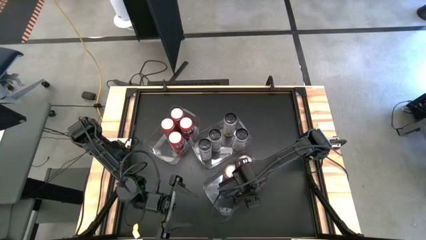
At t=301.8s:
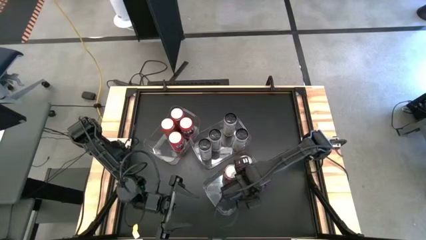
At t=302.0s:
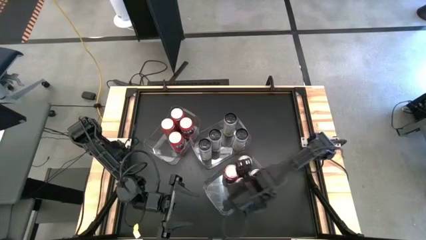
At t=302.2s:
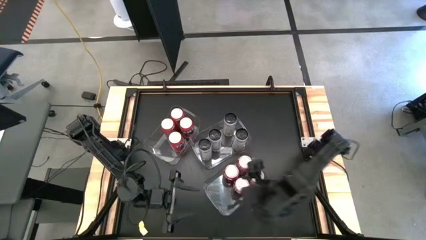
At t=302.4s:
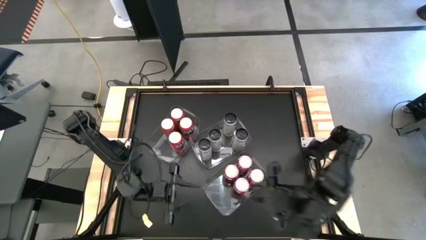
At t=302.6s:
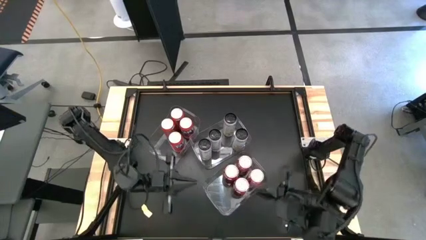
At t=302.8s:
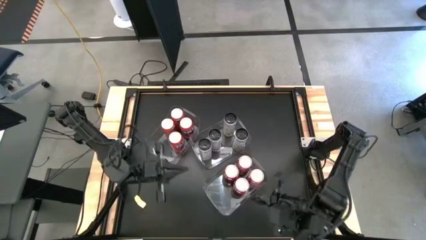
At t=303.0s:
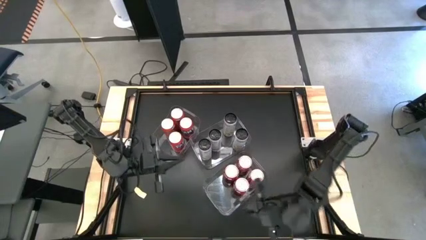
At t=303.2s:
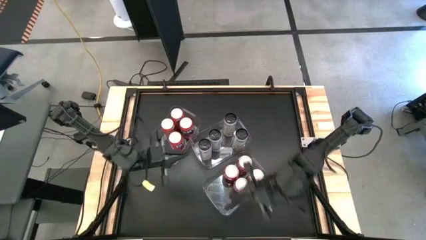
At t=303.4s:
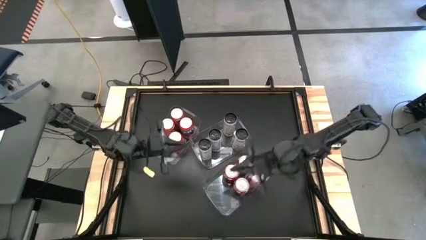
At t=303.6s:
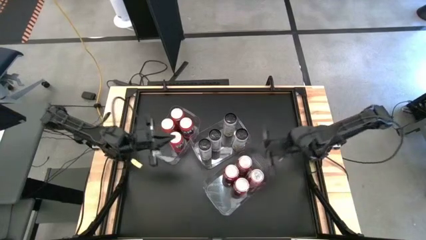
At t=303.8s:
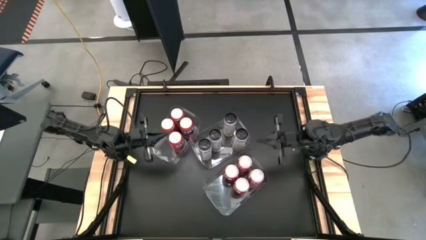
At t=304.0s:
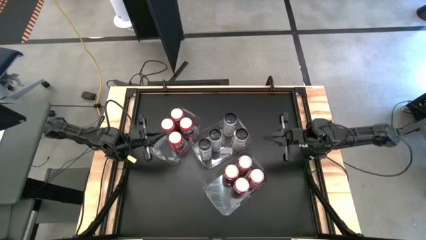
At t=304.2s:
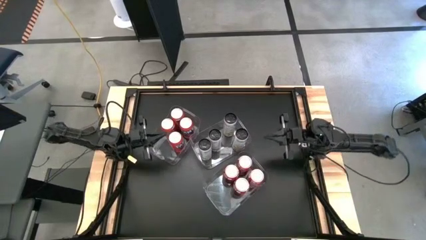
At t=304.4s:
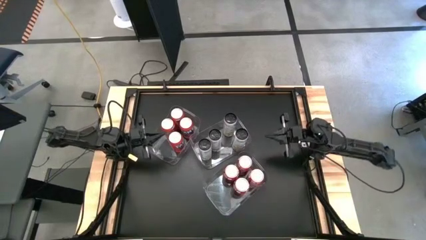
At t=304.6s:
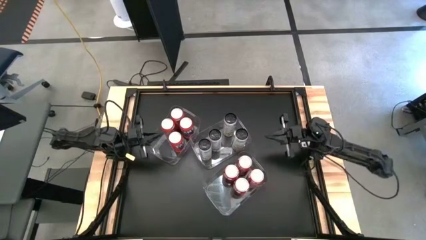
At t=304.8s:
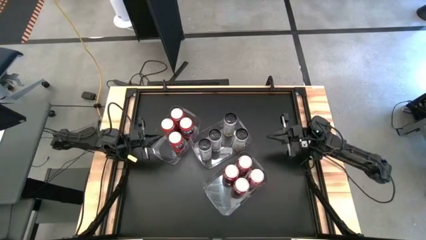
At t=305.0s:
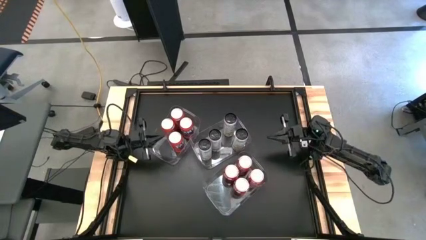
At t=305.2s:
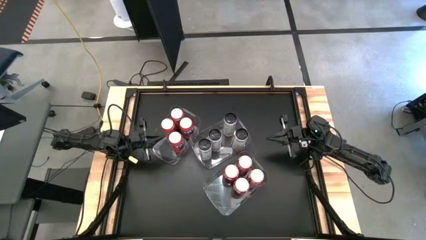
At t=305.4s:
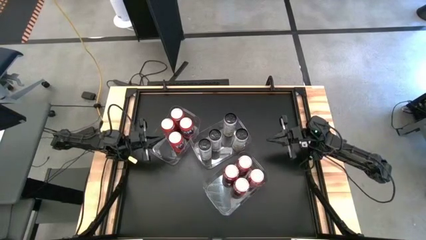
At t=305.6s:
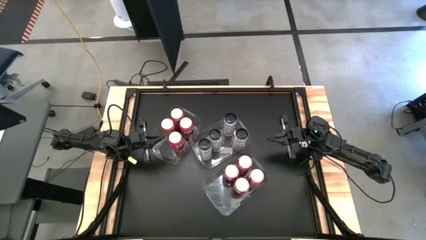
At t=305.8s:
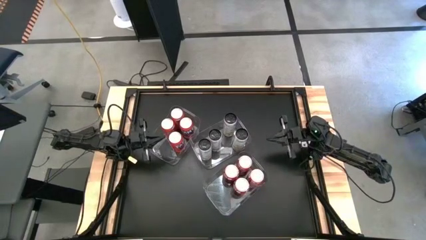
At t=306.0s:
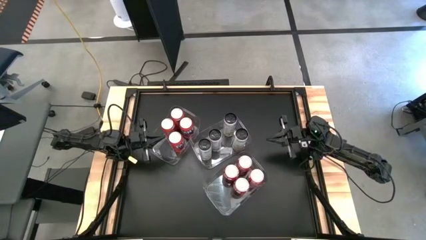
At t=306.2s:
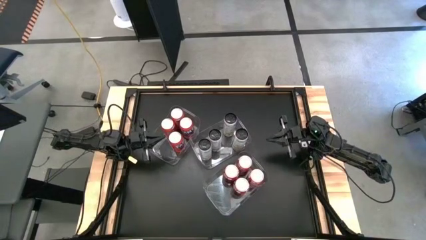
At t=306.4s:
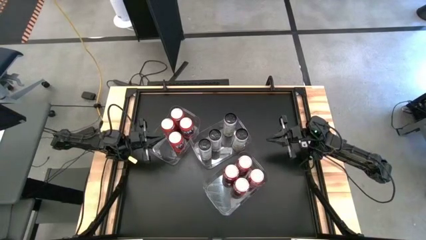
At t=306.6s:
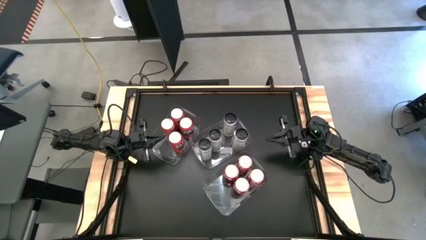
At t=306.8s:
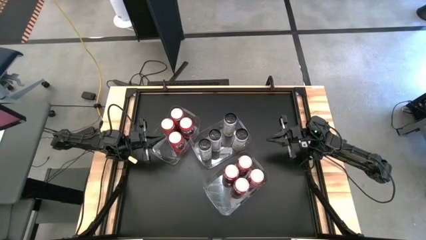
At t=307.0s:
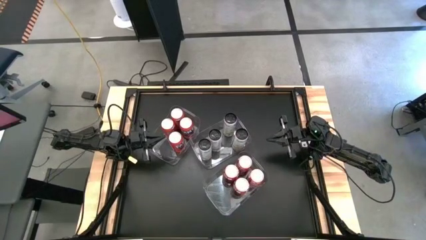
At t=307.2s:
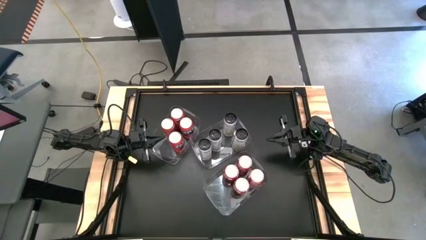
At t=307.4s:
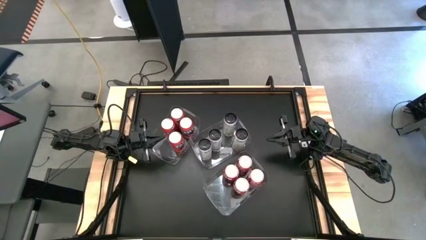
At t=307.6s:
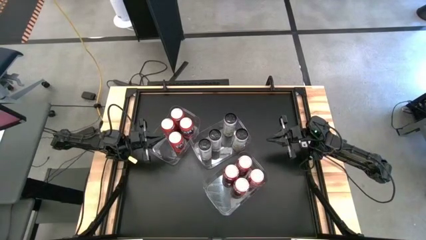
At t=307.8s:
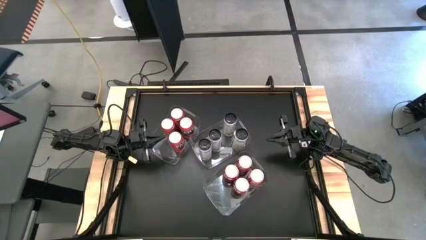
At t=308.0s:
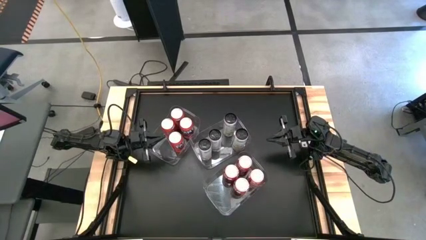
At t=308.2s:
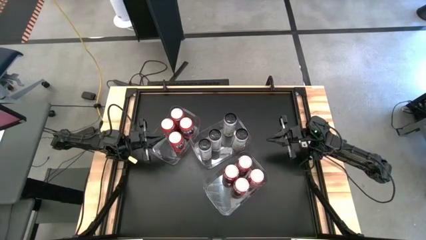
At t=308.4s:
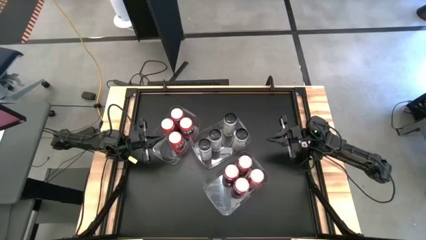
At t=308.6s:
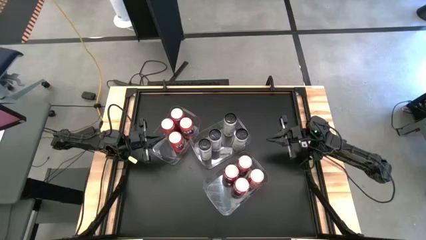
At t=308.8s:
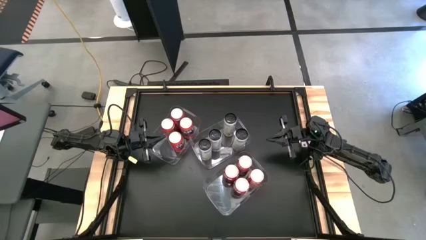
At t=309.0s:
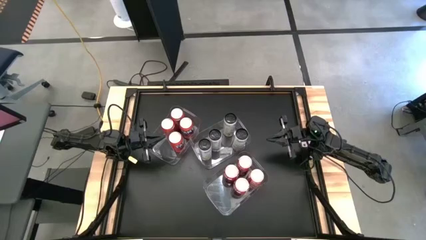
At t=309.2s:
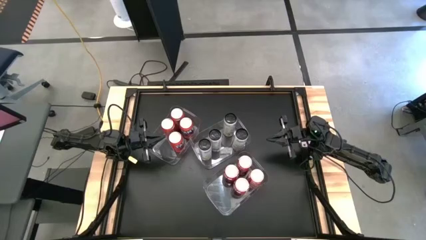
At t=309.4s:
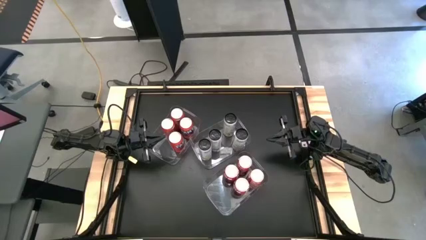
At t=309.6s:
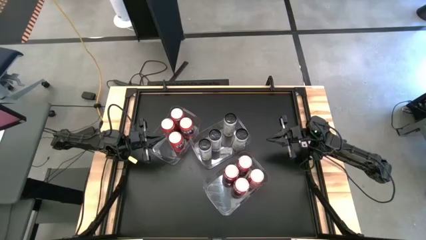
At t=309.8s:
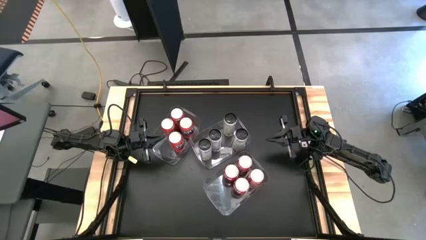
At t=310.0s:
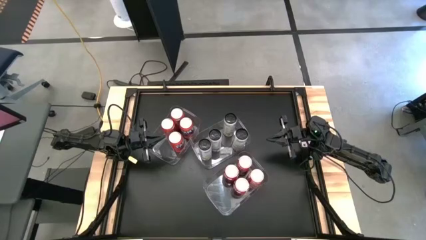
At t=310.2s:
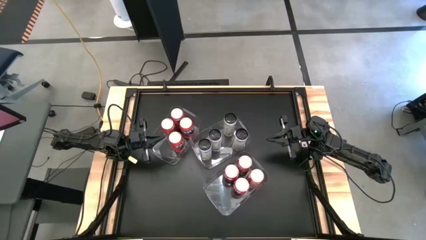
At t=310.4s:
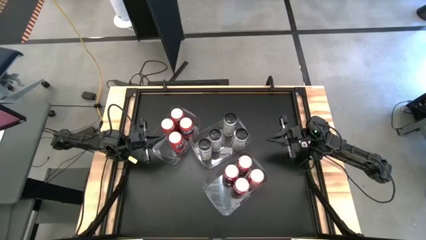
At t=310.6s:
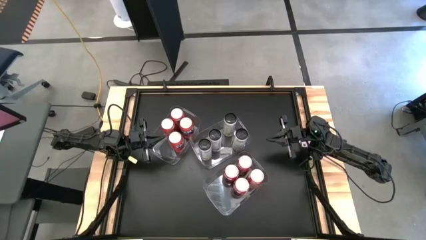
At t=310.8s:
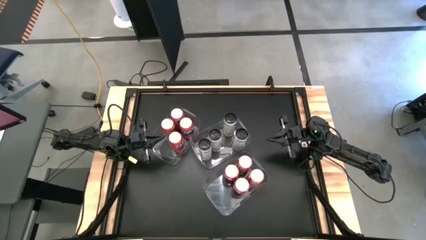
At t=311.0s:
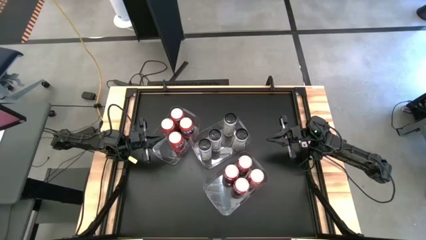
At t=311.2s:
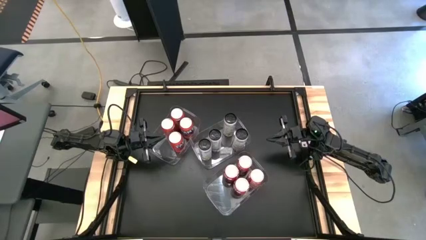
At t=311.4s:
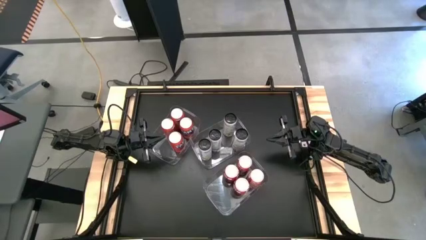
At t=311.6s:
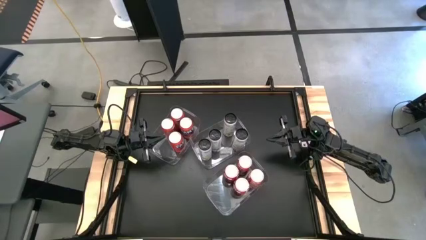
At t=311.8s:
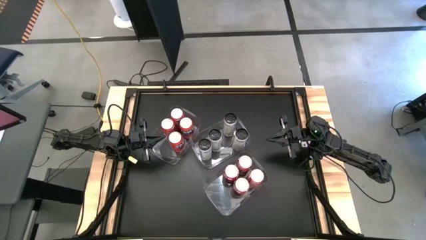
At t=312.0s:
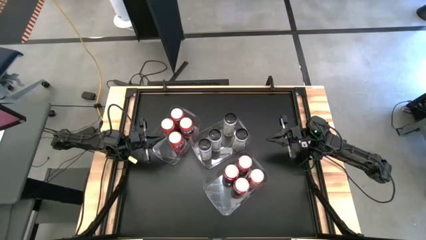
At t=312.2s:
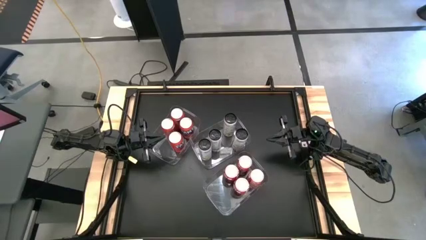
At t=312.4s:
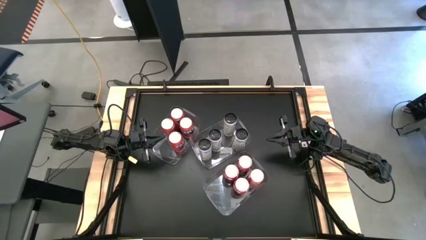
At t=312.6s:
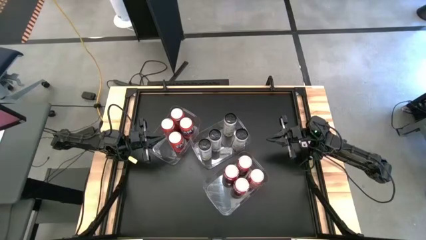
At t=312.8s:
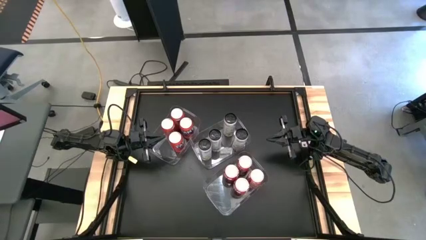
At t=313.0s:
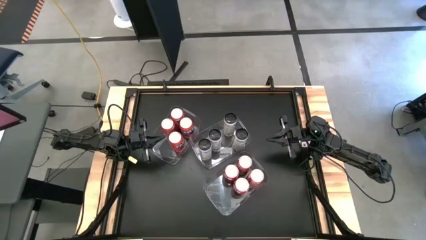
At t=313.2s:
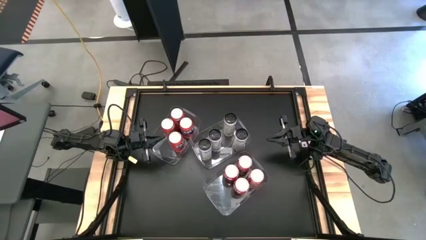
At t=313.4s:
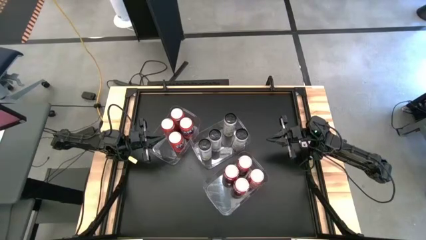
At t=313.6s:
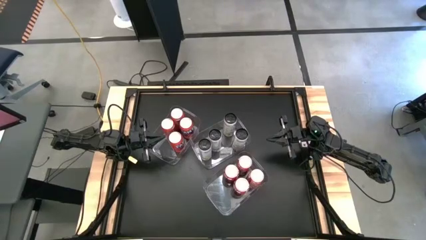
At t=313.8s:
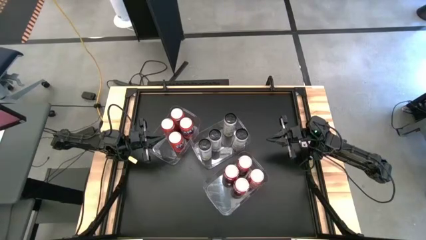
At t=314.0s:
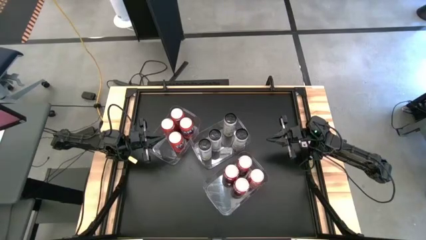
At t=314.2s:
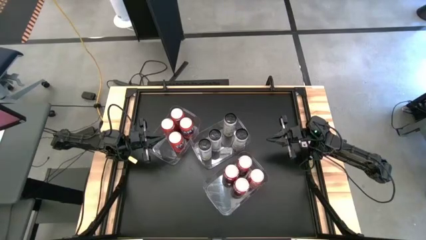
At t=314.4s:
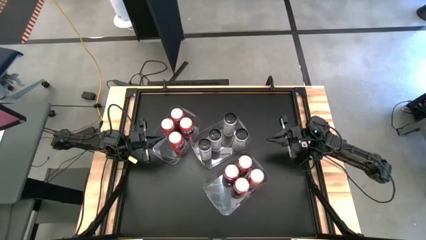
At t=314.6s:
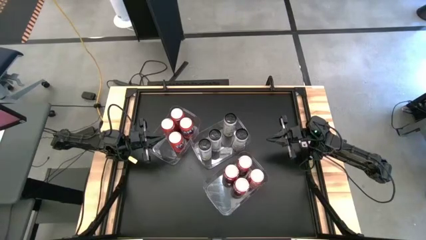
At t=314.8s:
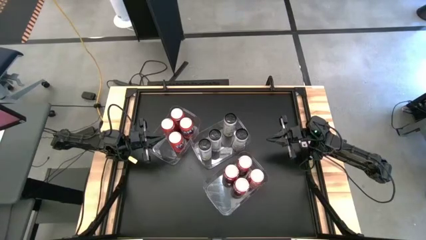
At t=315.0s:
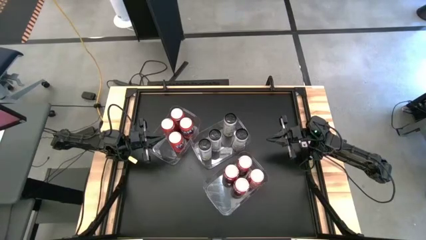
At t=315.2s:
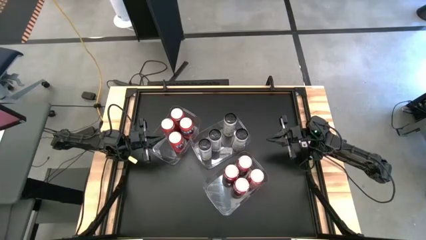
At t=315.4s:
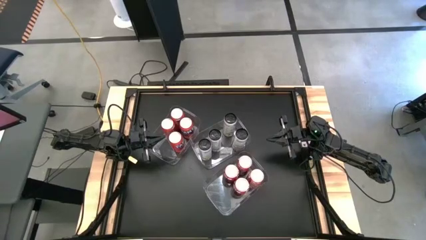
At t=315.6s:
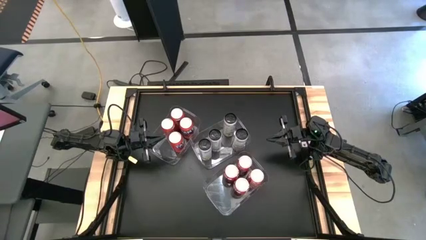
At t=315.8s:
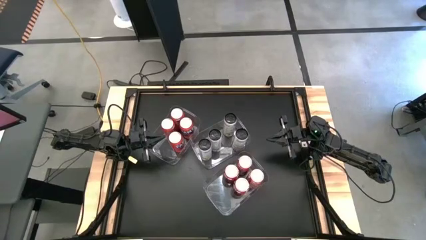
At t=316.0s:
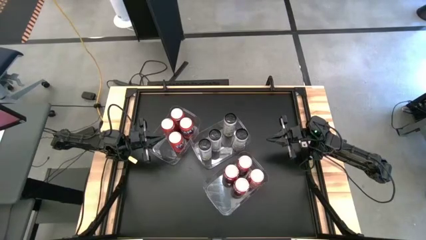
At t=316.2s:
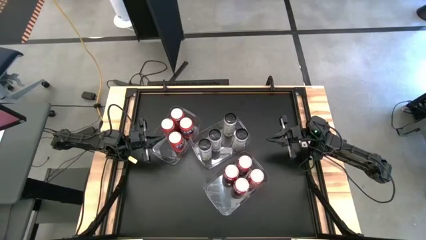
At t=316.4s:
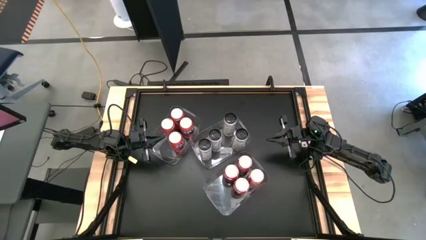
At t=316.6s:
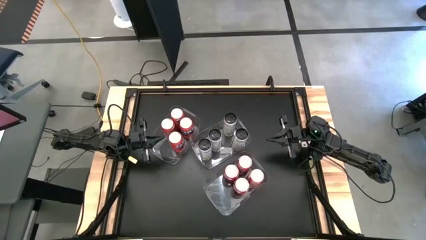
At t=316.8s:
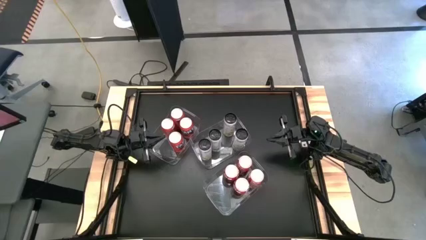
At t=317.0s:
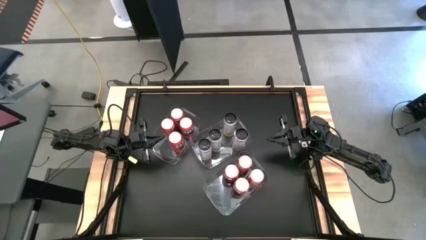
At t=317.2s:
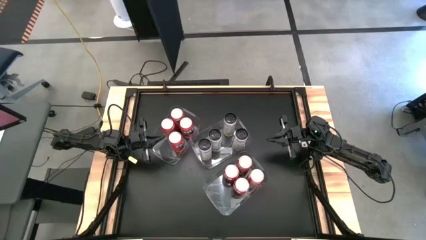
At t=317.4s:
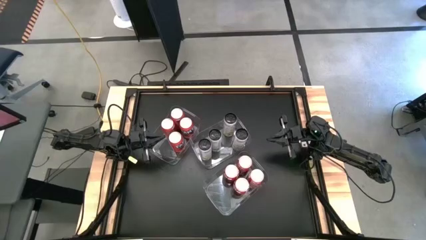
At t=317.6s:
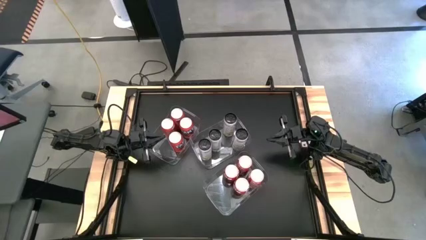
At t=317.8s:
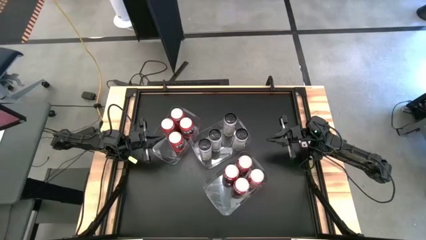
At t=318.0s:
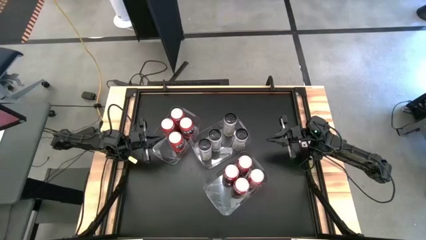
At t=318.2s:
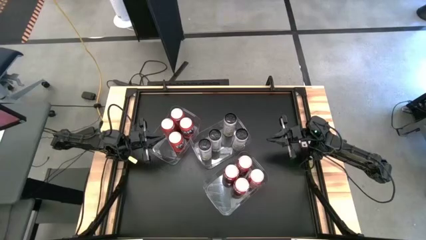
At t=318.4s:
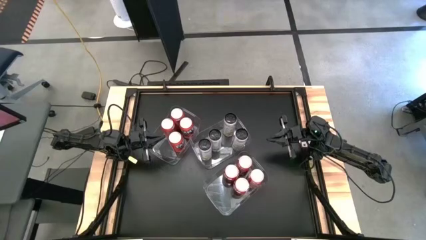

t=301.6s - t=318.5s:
Task: Sort soda cans
Return to Home Position
